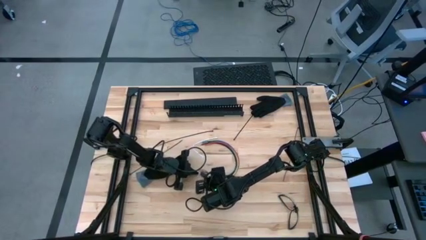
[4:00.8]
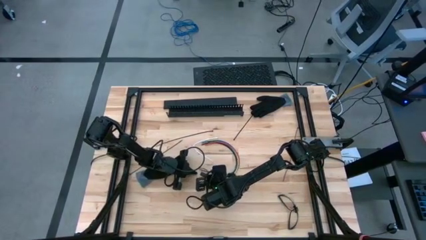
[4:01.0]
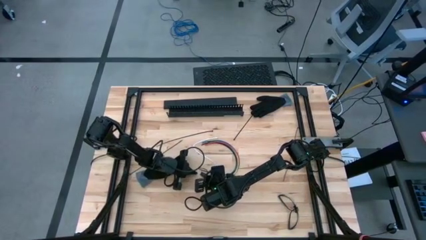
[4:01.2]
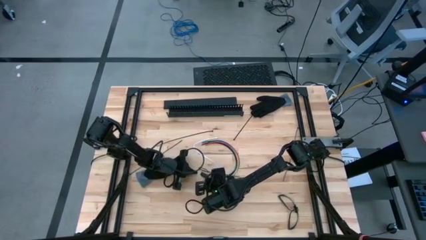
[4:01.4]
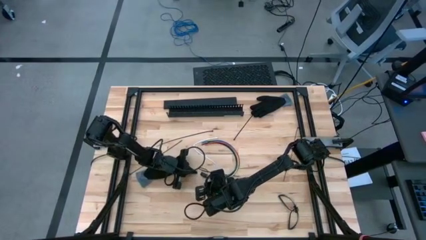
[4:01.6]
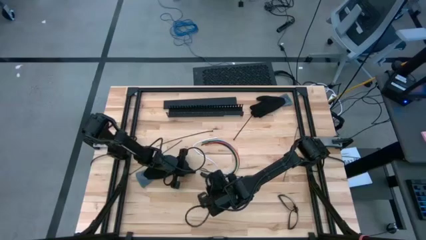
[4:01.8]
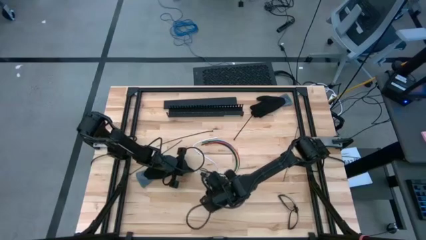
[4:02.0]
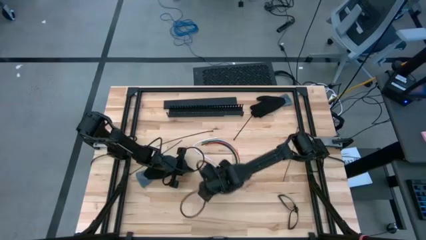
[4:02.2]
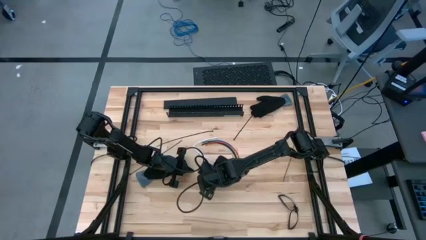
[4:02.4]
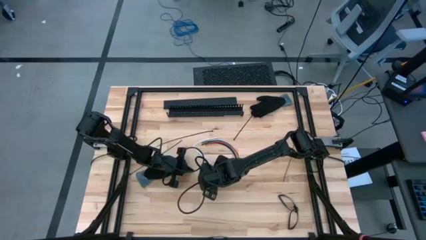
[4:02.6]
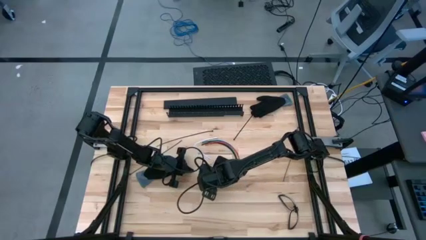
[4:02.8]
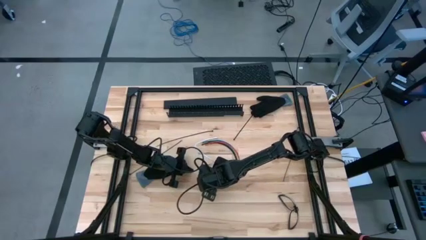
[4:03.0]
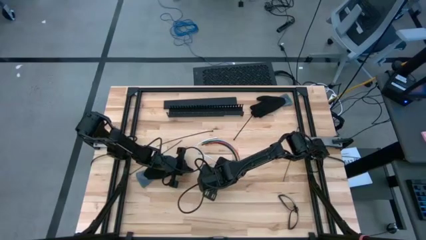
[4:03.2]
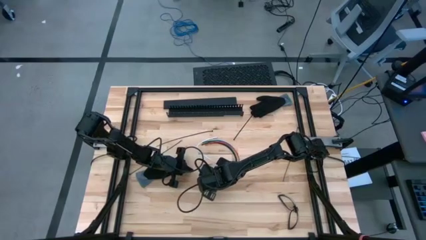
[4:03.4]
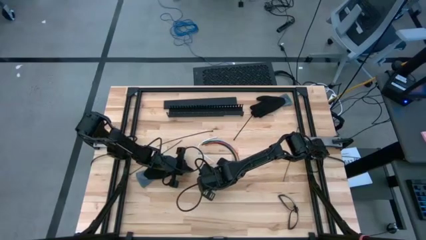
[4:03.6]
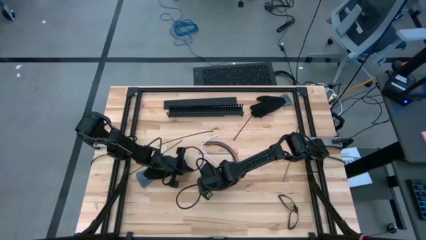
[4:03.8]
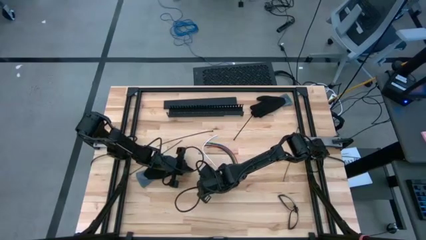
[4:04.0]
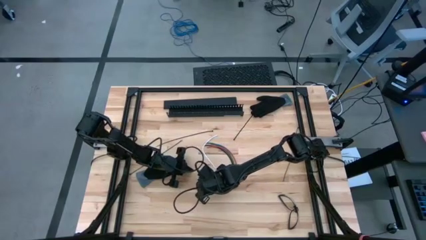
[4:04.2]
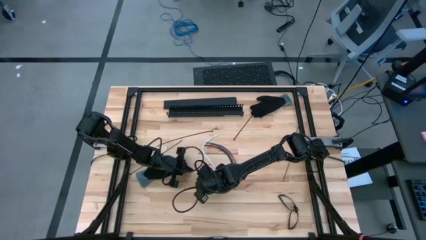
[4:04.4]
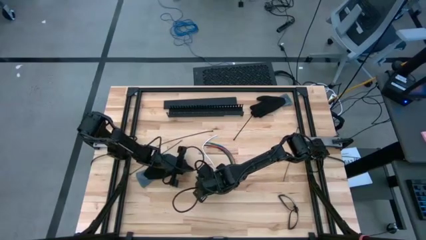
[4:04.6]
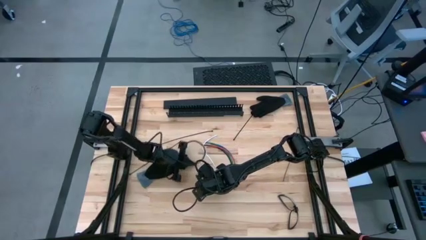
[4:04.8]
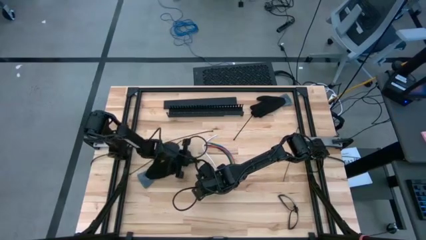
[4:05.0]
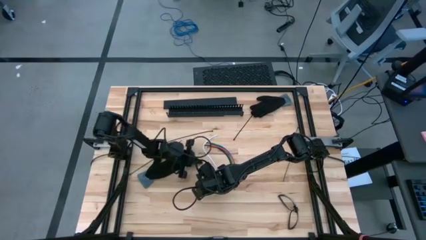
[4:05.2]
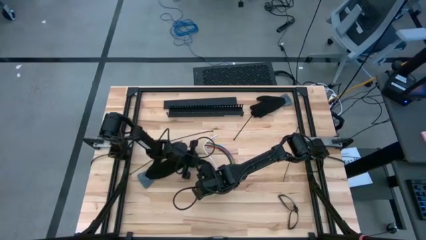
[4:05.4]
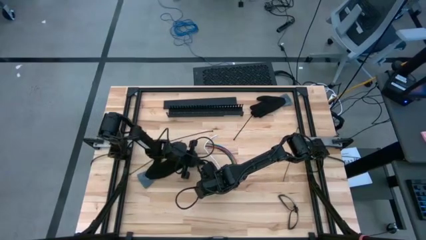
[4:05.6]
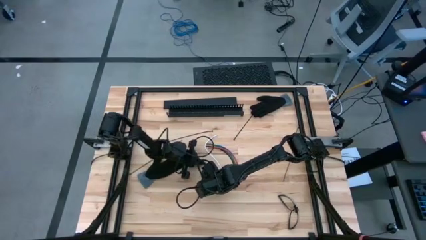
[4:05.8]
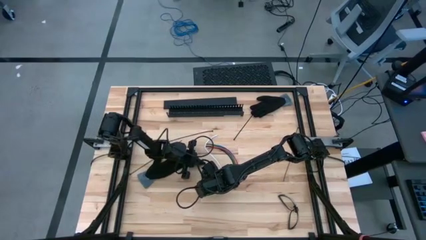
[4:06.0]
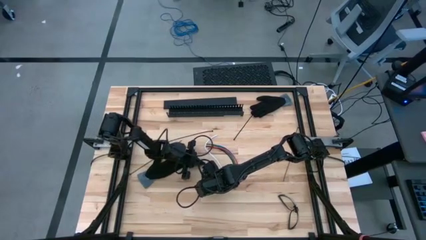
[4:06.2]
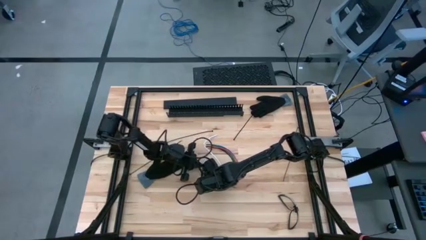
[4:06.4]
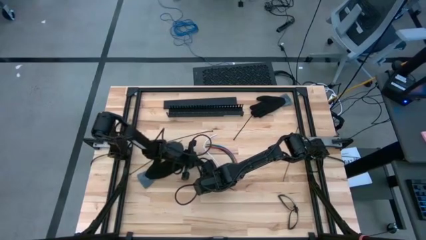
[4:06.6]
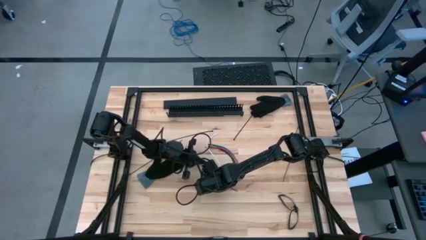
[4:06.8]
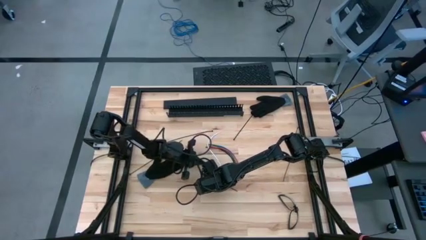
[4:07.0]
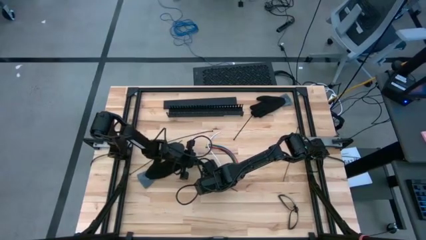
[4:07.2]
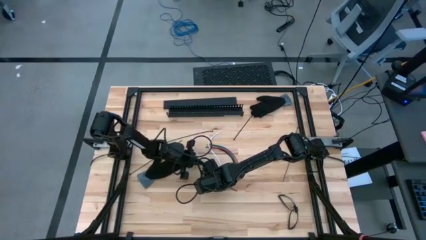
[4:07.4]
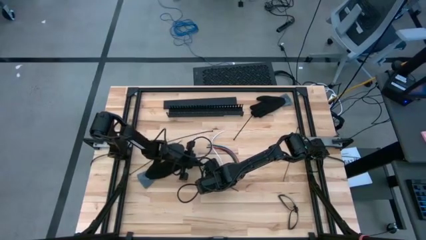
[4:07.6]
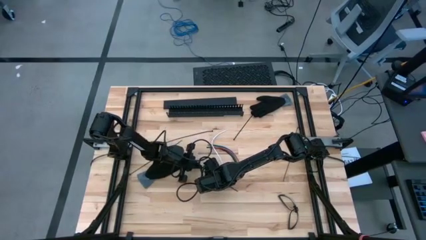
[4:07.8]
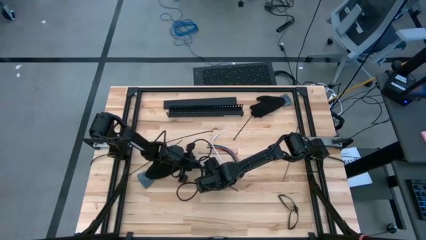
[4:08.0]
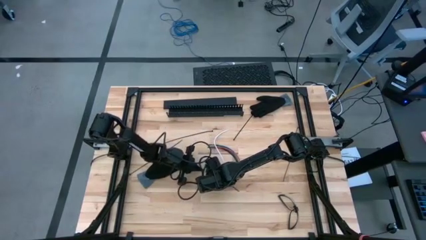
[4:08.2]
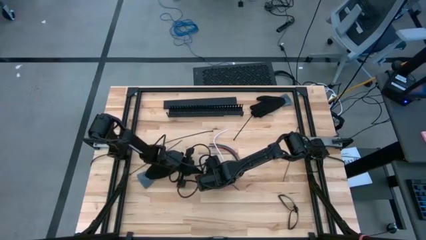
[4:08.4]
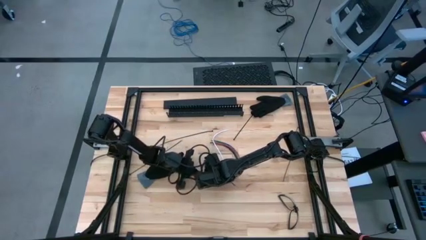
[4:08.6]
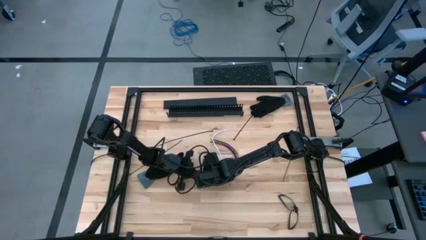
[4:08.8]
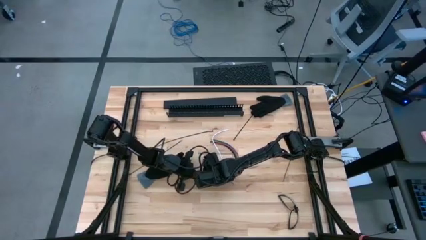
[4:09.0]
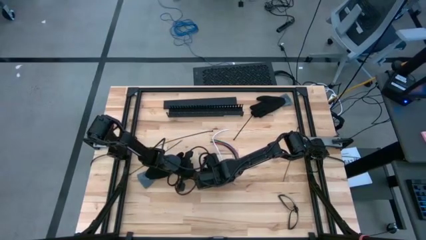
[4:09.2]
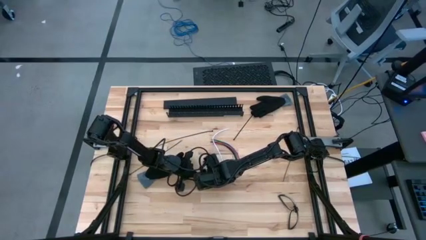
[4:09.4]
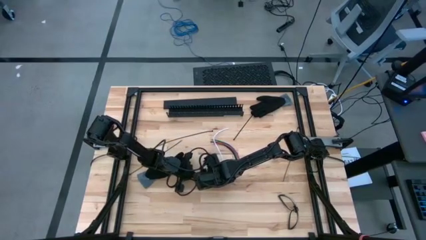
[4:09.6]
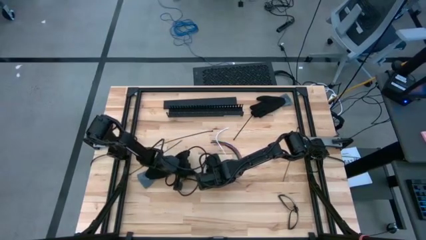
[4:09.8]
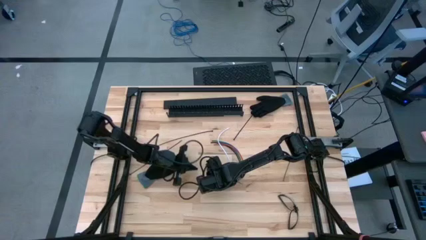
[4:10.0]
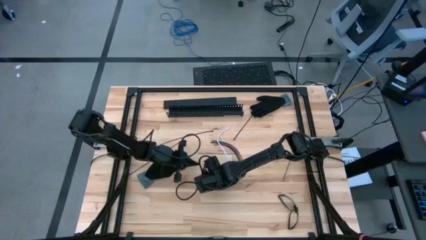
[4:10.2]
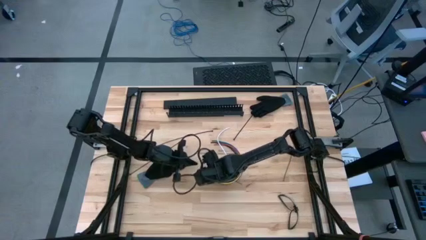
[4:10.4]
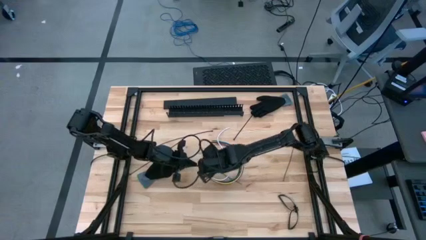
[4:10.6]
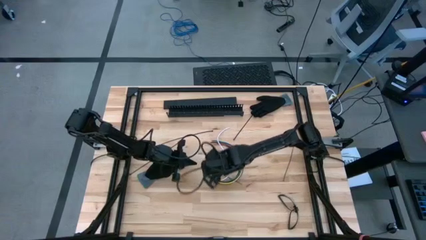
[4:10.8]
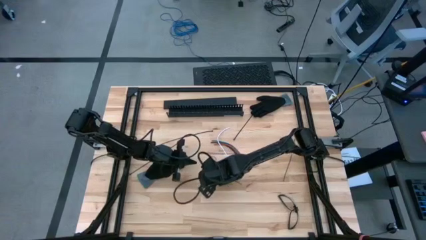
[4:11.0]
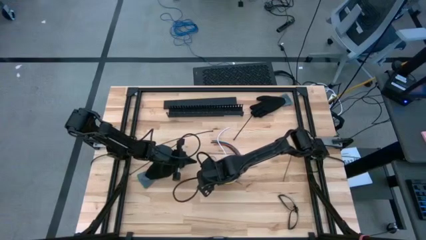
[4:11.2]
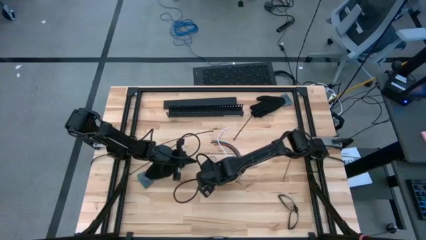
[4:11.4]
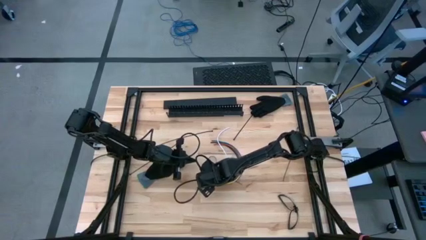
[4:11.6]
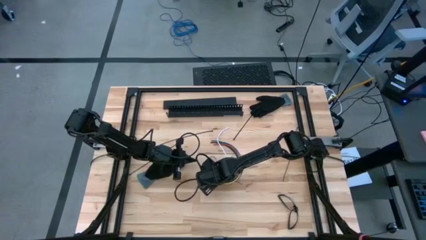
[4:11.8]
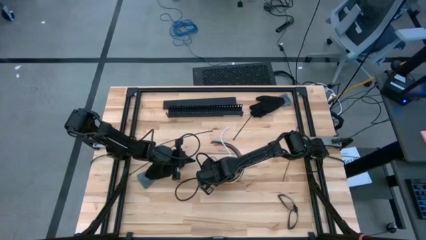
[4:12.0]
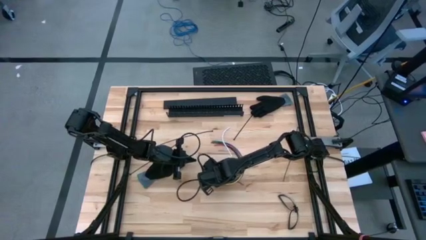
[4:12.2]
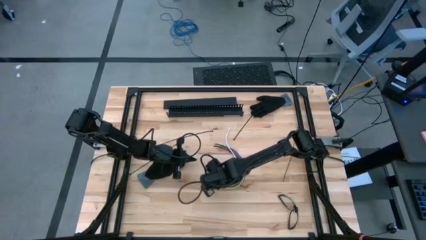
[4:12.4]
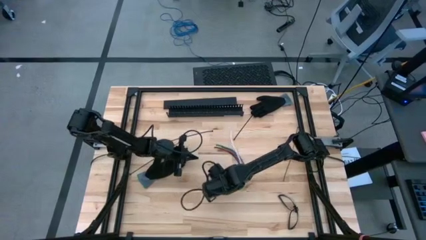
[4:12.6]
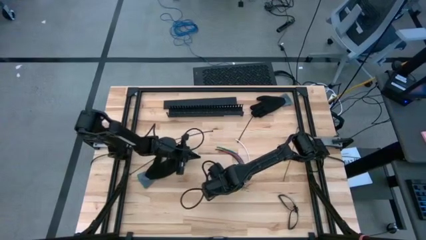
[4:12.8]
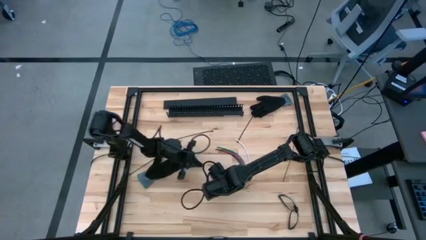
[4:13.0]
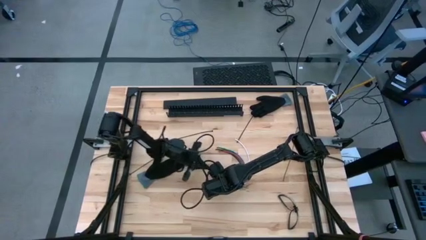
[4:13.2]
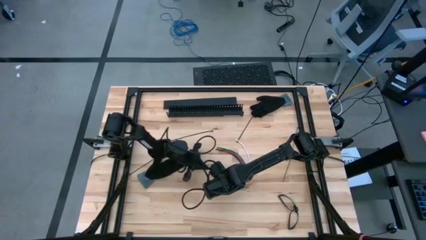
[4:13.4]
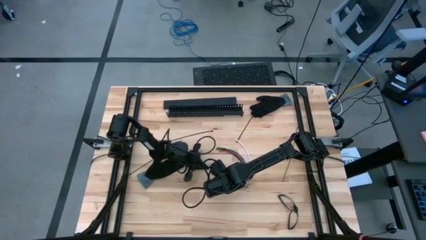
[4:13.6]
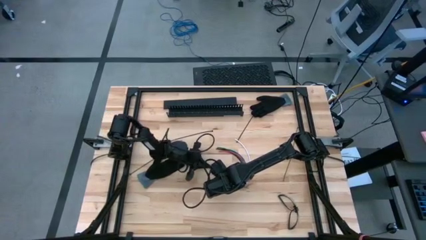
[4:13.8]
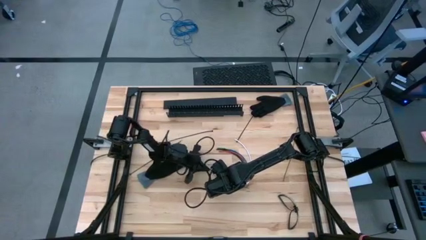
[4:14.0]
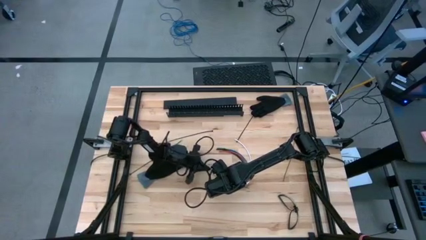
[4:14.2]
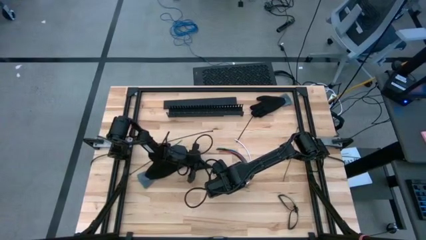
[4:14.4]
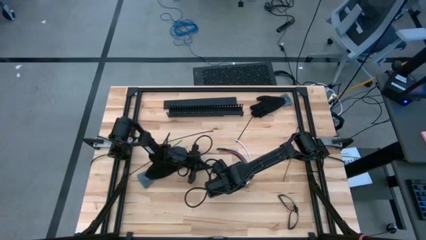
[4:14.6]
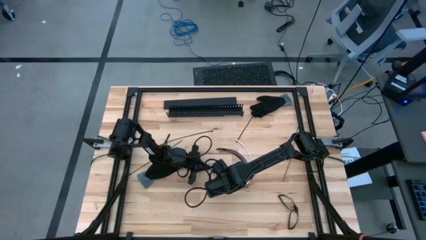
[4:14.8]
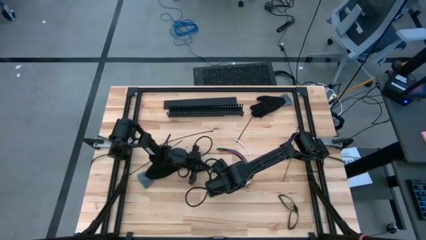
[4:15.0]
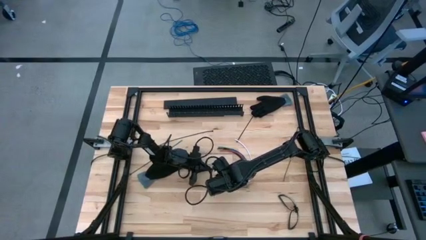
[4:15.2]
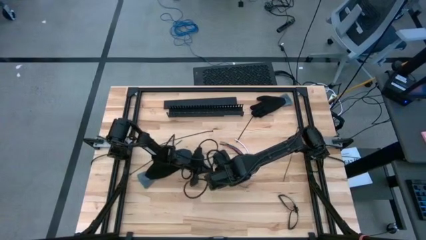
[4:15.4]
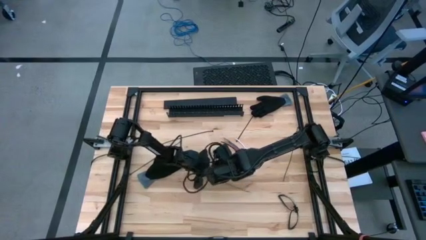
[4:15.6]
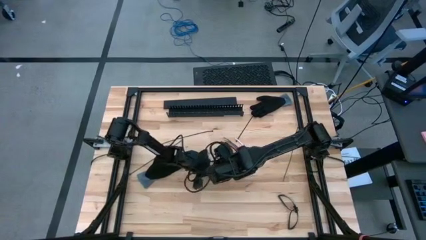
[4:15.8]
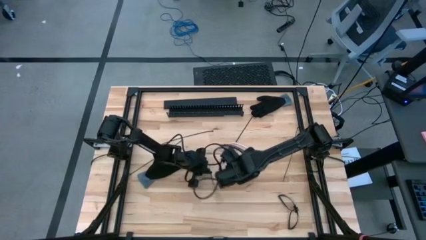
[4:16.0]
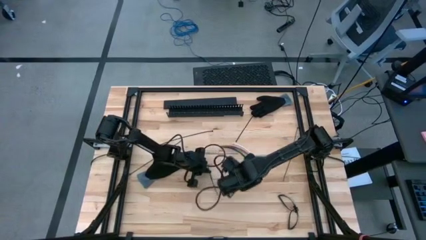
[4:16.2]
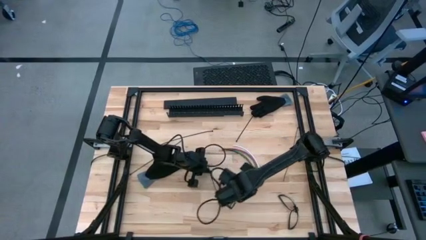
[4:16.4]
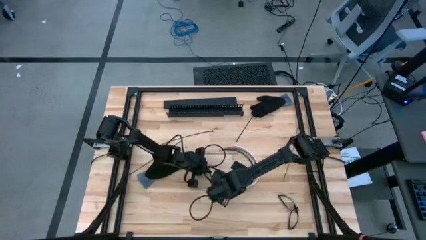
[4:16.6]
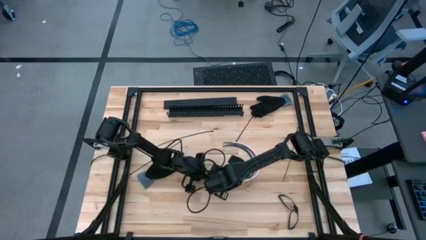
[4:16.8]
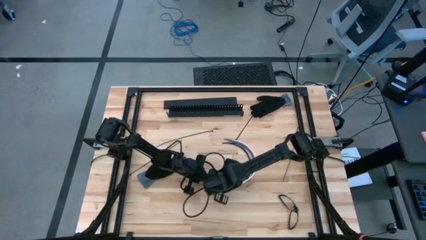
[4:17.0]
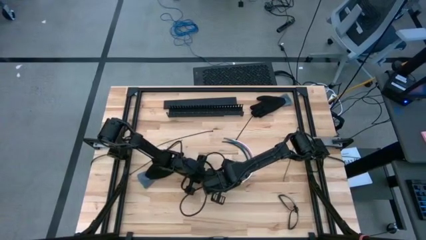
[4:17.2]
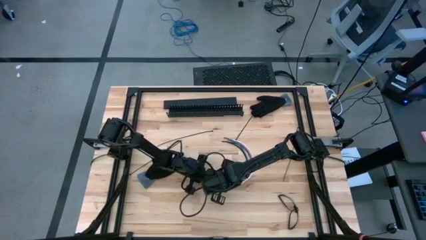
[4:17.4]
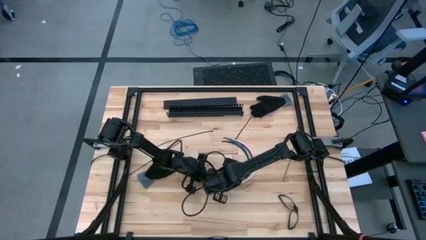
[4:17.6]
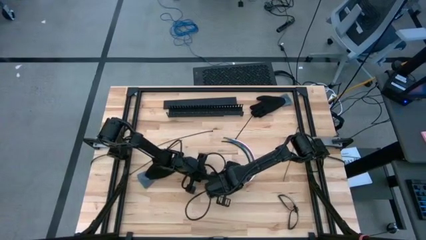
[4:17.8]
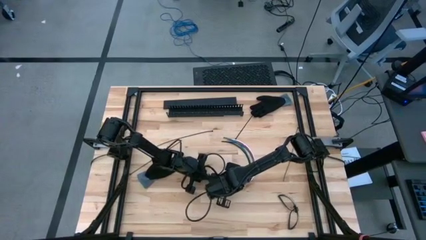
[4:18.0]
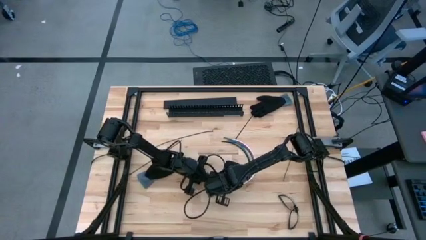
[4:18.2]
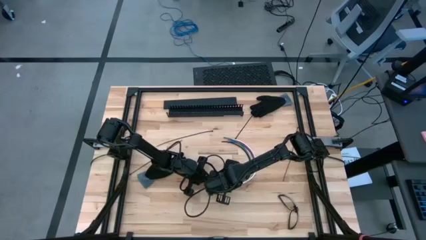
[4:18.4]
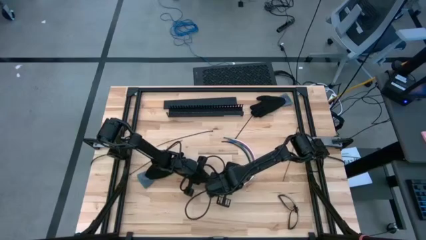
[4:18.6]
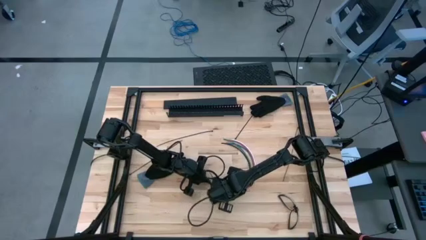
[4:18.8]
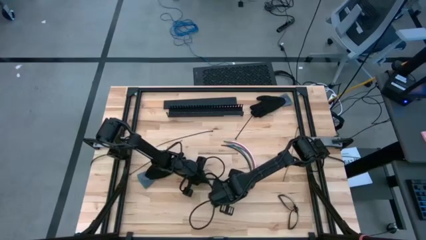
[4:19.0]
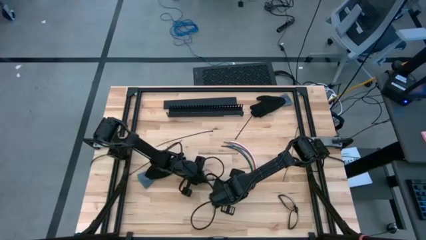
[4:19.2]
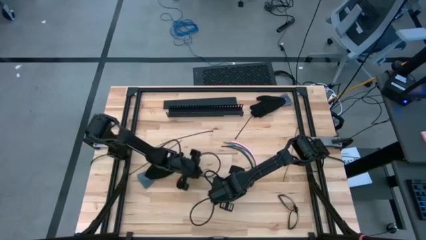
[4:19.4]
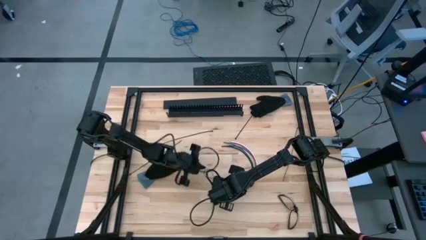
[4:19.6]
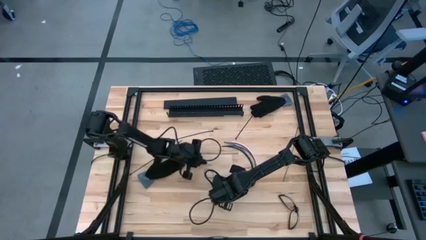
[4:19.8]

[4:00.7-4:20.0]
Task: Ziptie cables
Wrap the cable wires using a zip tie
